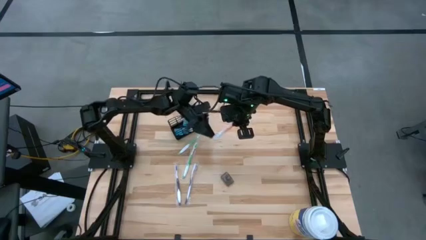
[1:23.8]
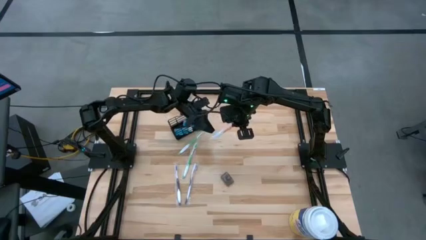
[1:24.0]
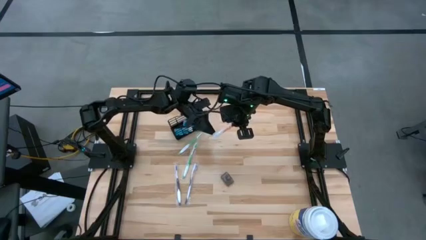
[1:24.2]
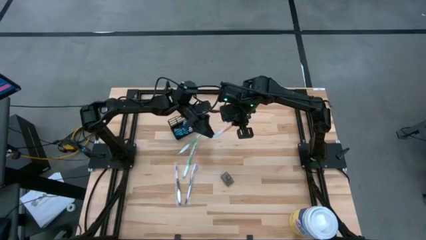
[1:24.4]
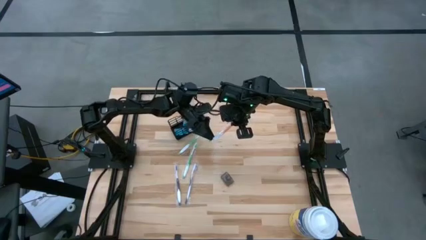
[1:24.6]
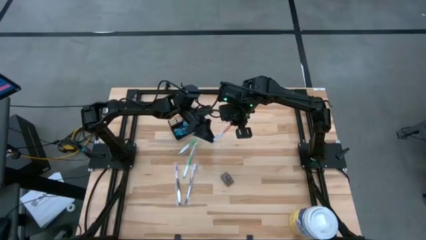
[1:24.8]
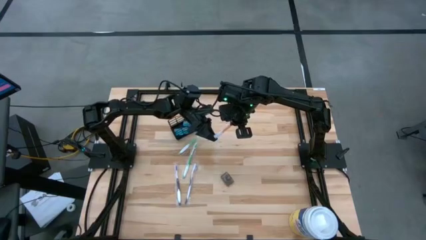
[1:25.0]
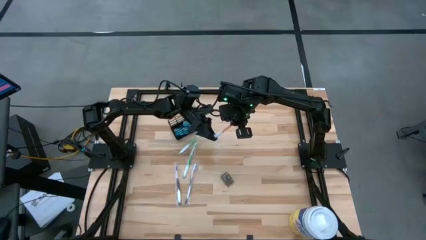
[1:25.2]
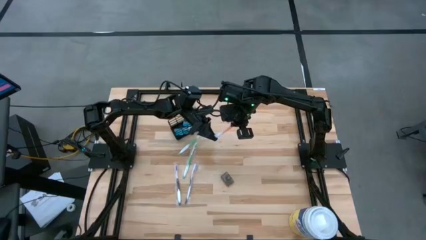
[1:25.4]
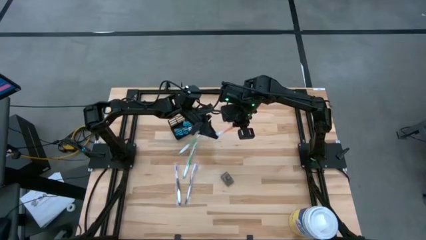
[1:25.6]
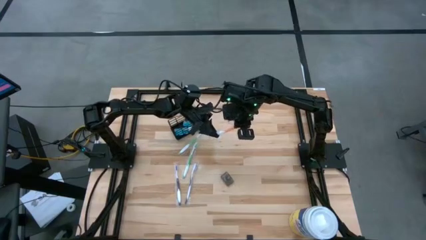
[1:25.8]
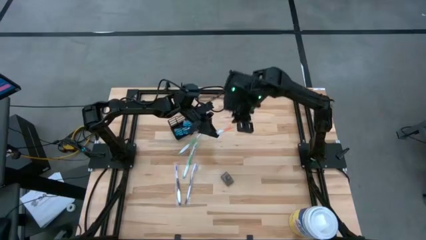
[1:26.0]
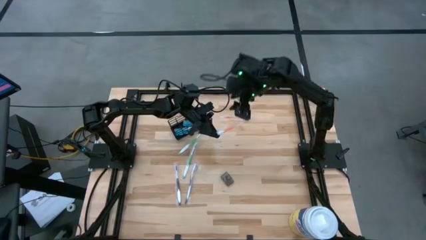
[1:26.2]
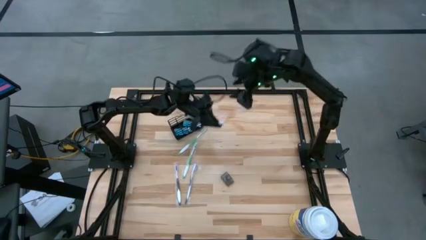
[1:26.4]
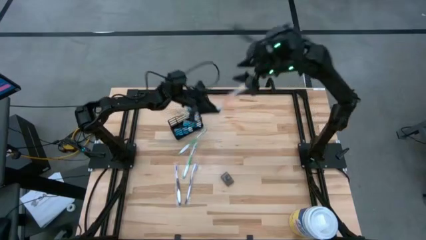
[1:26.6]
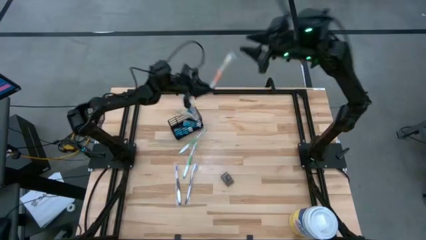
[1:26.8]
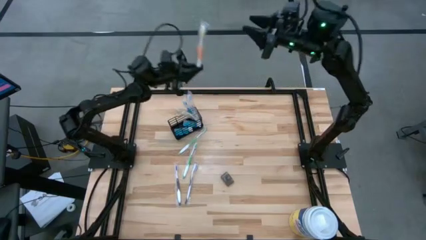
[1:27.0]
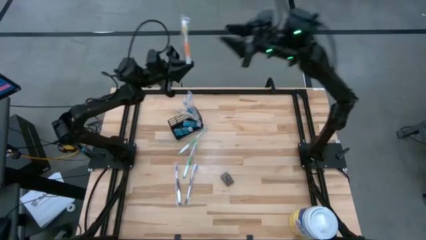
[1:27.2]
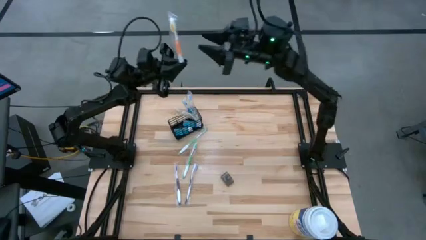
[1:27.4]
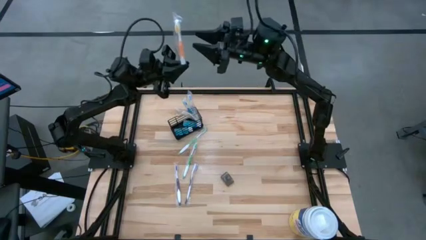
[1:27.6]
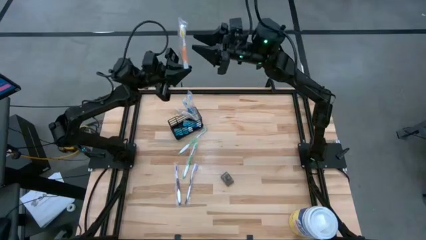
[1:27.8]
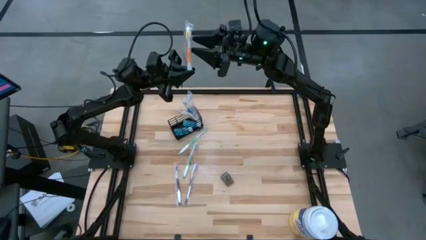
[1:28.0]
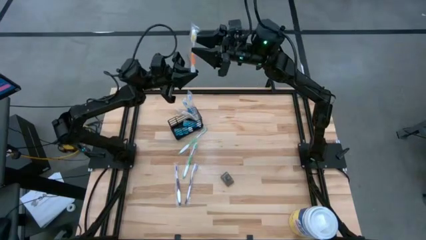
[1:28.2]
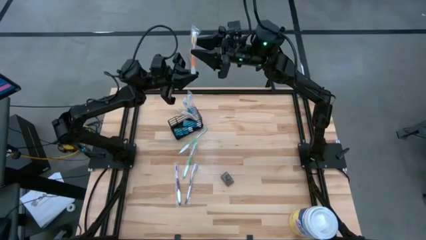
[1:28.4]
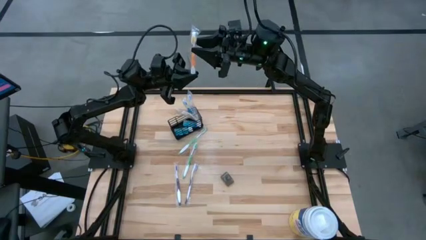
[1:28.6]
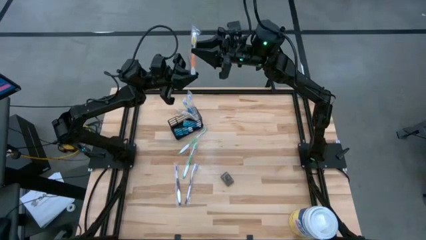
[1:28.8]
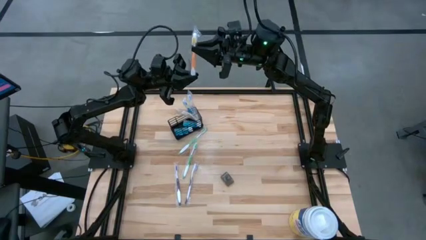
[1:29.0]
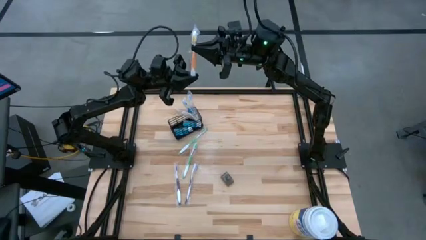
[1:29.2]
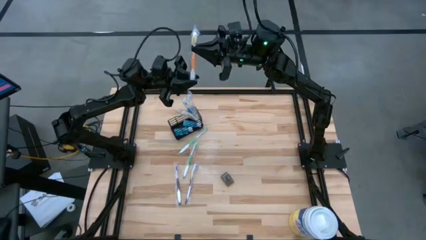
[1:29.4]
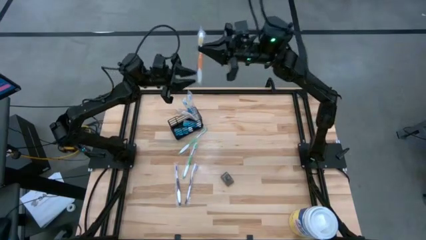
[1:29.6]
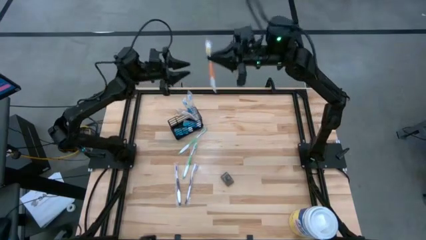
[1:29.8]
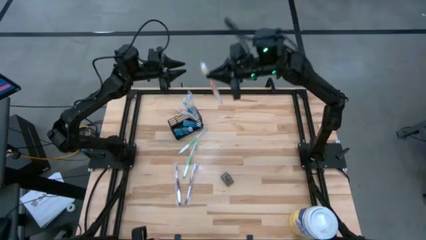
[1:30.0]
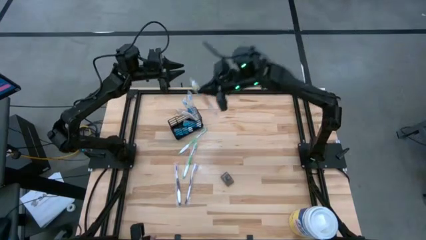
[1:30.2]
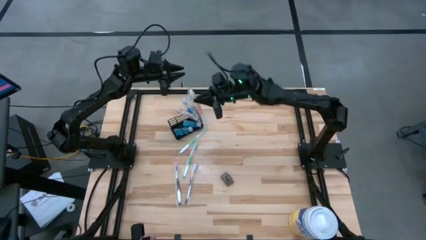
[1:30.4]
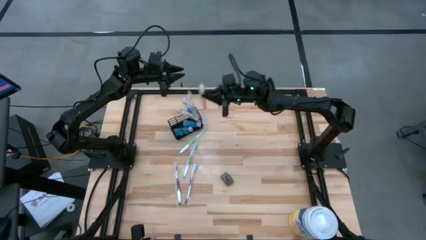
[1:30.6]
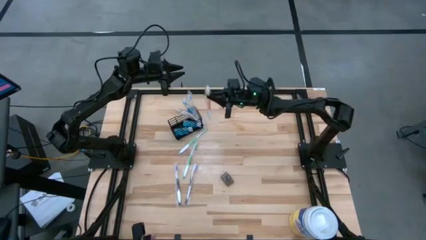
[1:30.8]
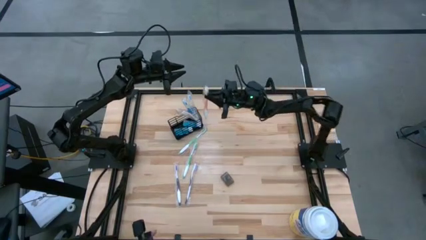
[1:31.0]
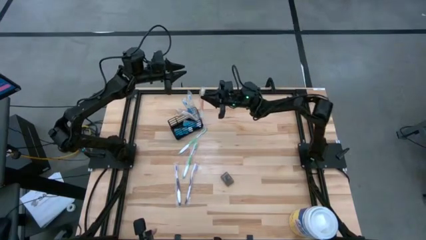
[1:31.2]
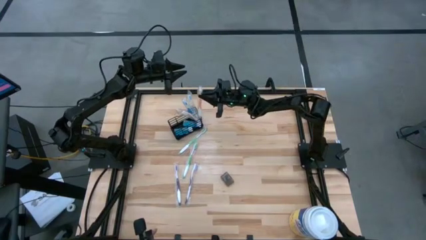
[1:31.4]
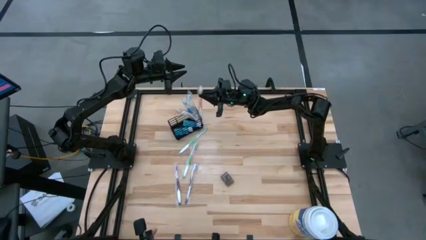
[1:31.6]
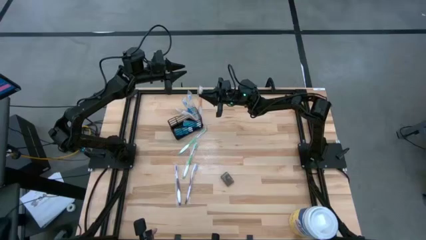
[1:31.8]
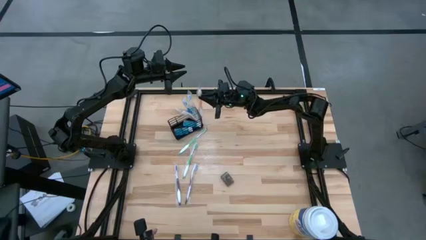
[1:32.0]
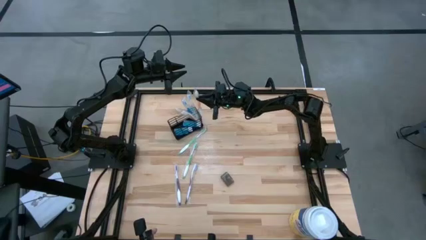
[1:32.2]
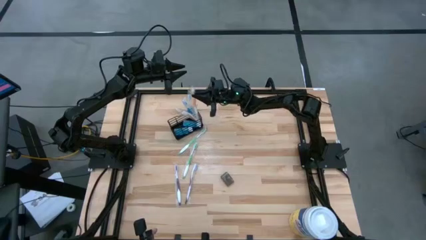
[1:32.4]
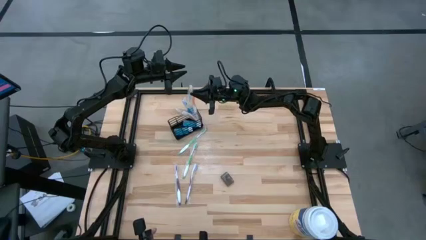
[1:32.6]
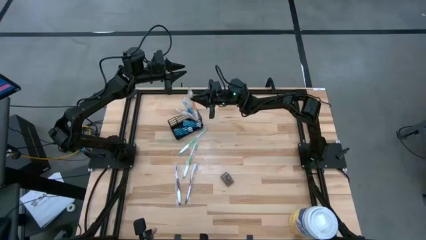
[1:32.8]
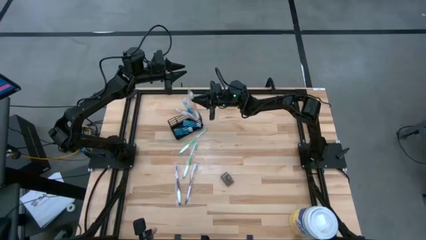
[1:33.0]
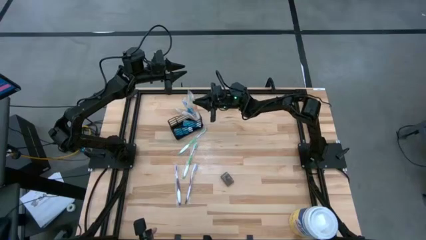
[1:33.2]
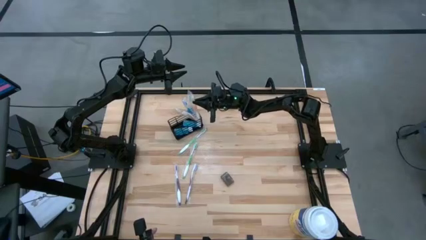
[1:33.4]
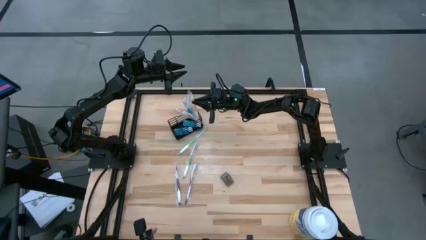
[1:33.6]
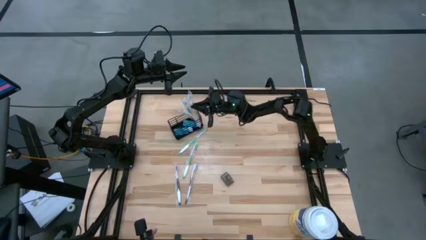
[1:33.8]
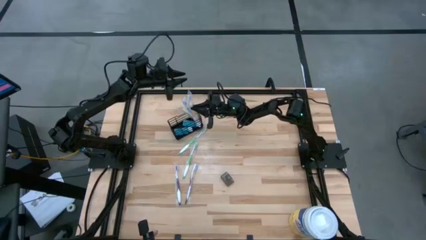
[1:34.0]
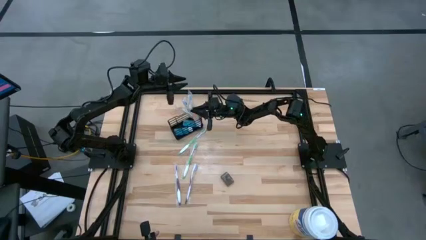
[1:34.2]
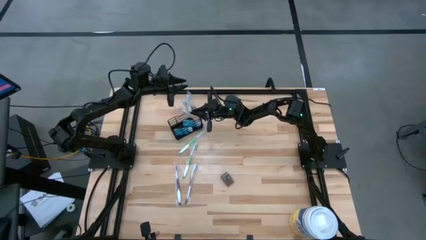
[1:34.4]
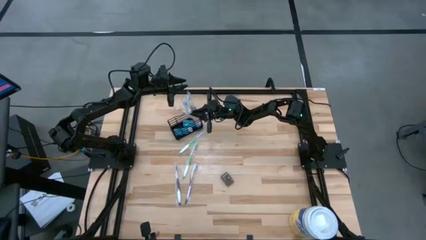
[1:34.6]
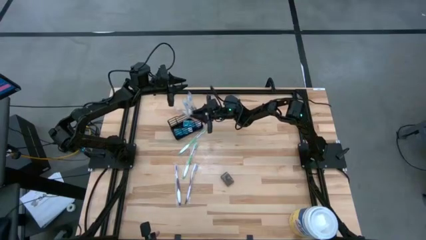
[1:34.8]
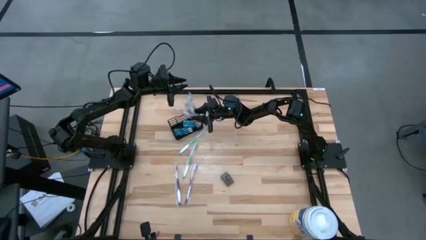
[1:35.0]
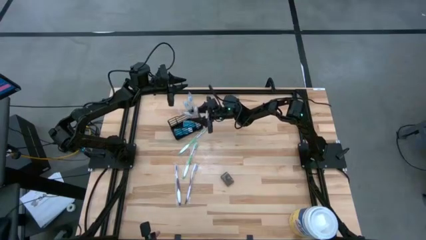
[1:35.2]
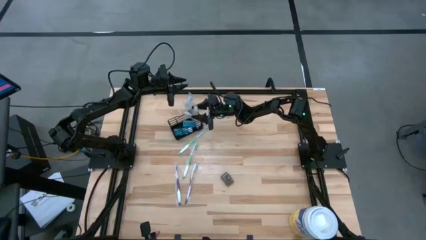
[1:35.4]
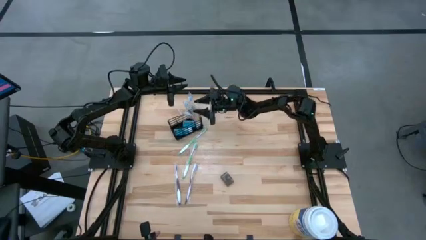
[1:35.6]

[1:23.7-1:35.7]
Task: Pick & Place toothbrushing station
Put the orange toothbrush into the black organizer
